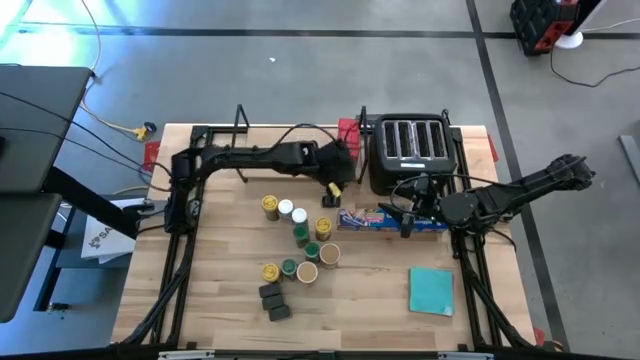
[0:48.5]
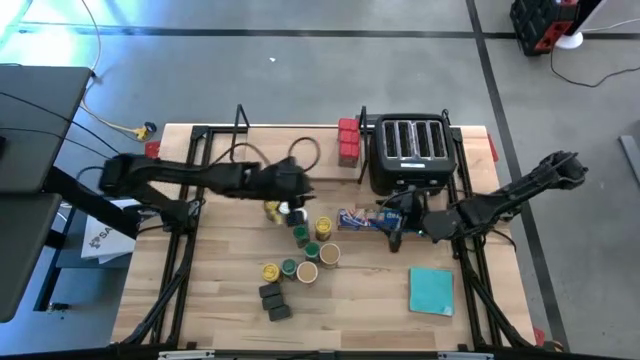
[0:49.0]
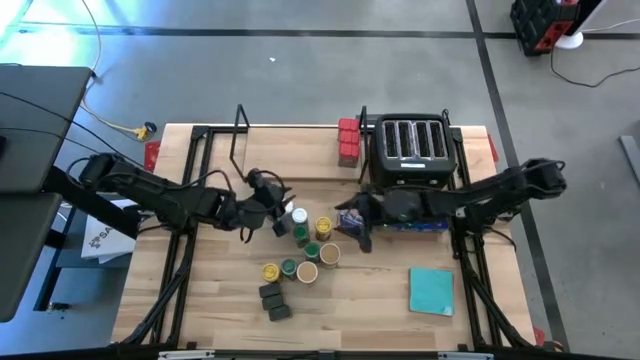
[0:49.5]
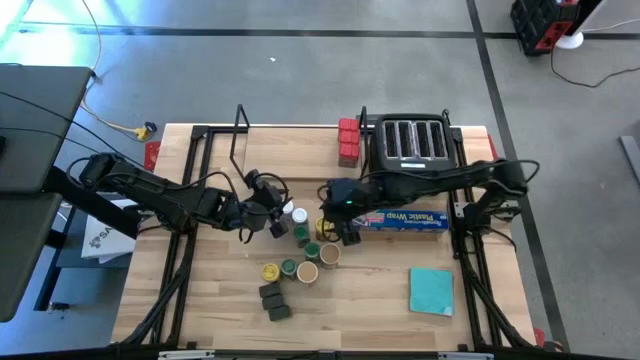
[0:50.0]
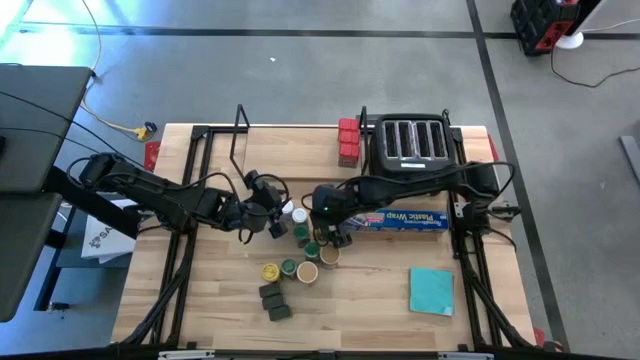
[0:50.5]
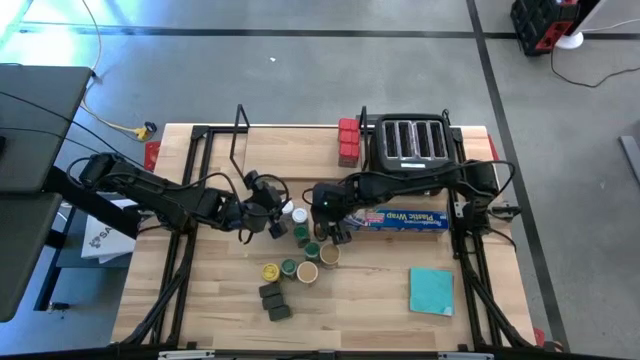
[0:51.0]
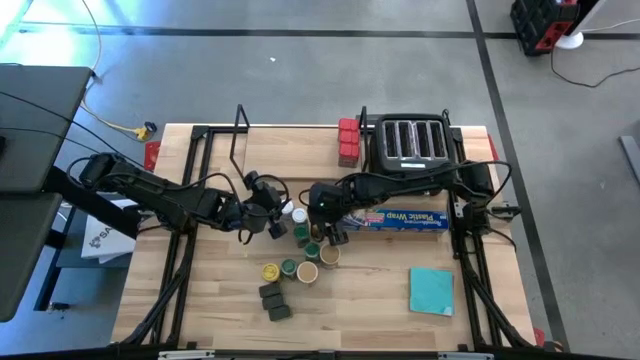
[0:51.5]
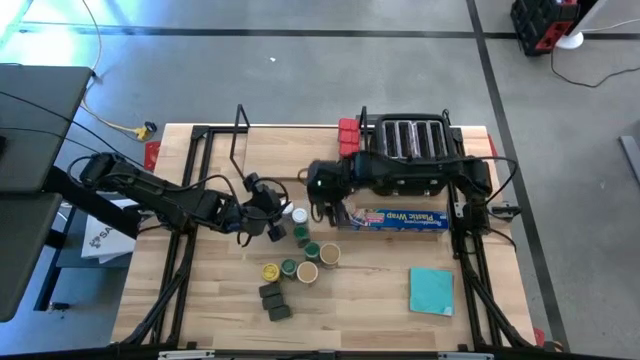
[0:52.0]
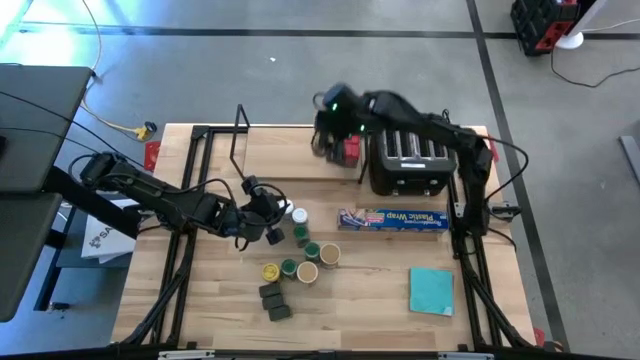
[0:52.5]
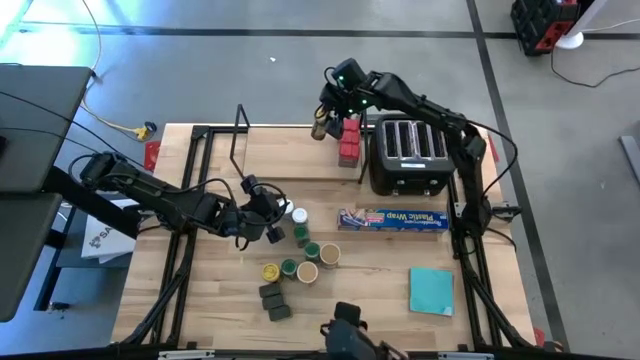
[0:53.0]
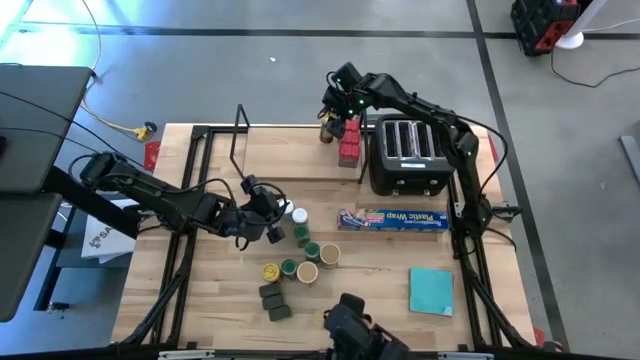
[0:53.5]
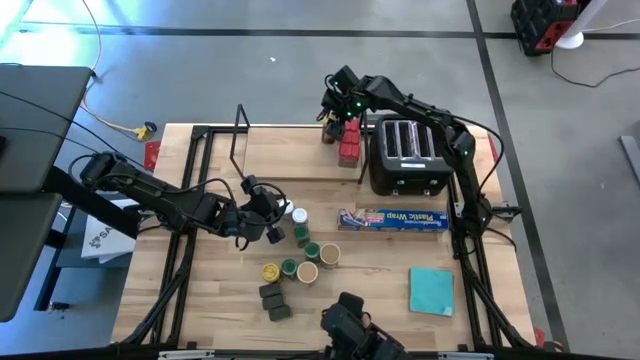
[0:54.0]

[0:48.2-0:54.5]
Task: Shelf spices
Put the right yellow seasoning can on the shelf

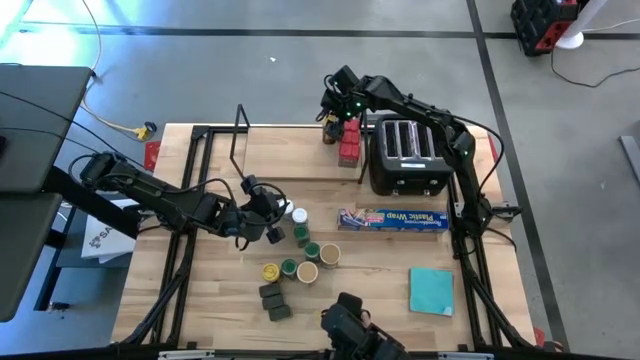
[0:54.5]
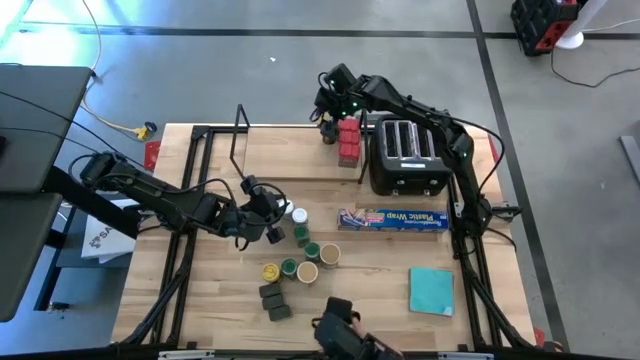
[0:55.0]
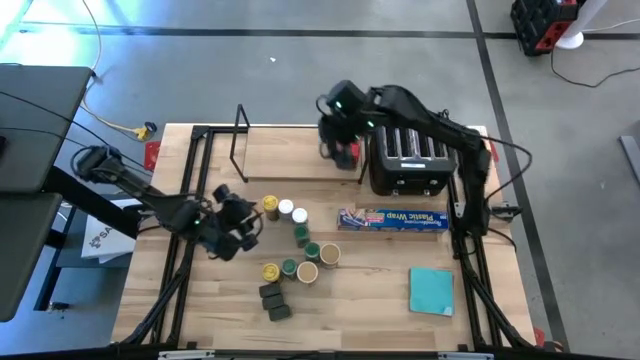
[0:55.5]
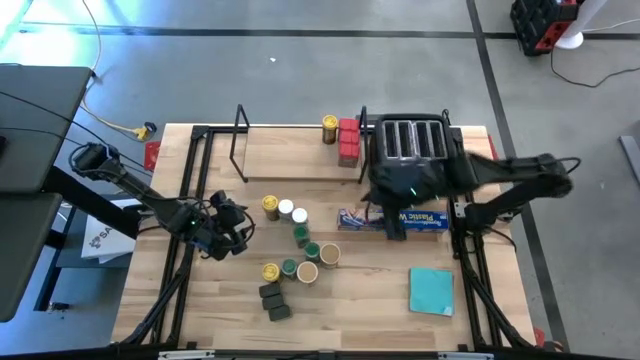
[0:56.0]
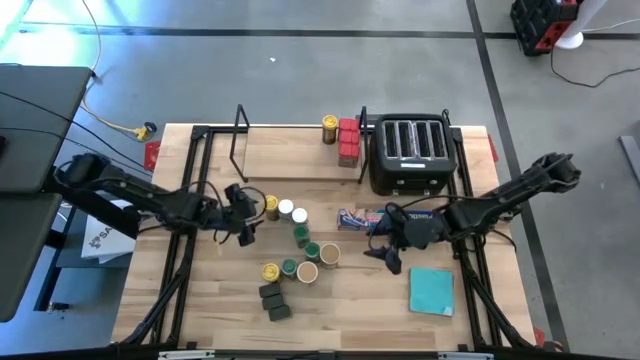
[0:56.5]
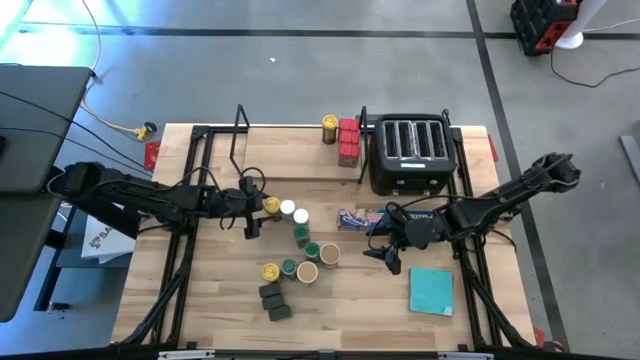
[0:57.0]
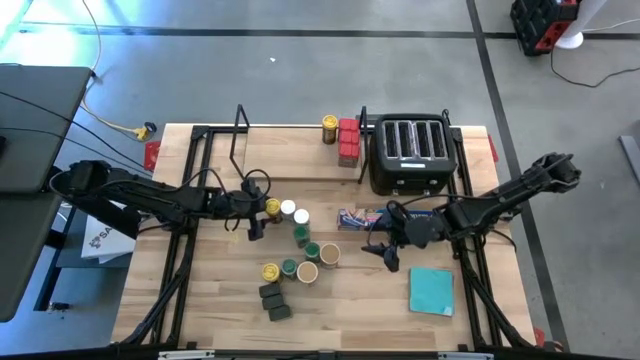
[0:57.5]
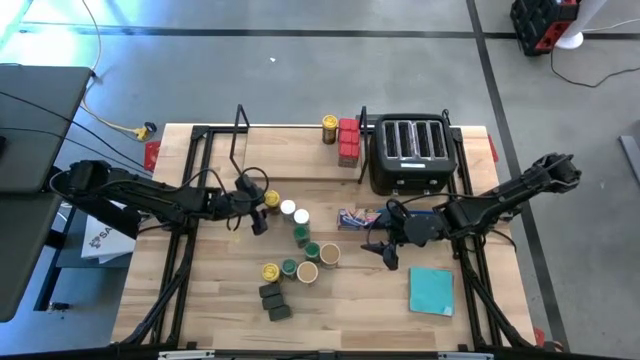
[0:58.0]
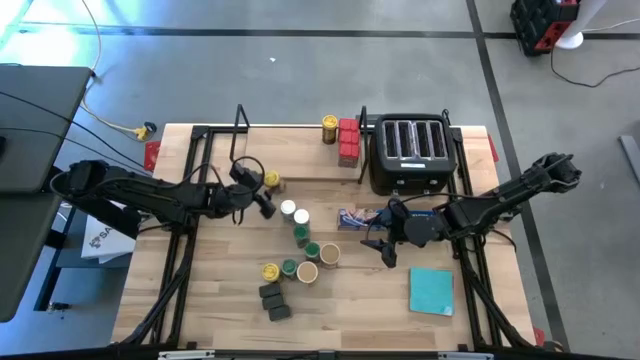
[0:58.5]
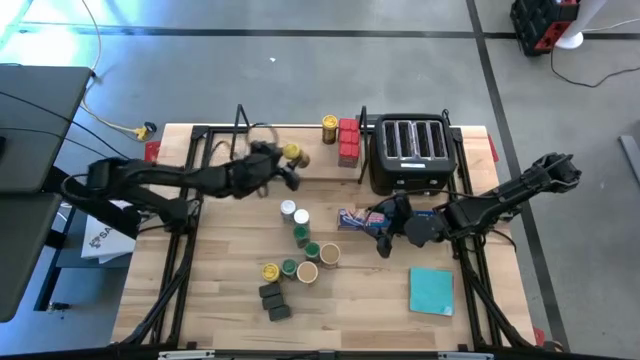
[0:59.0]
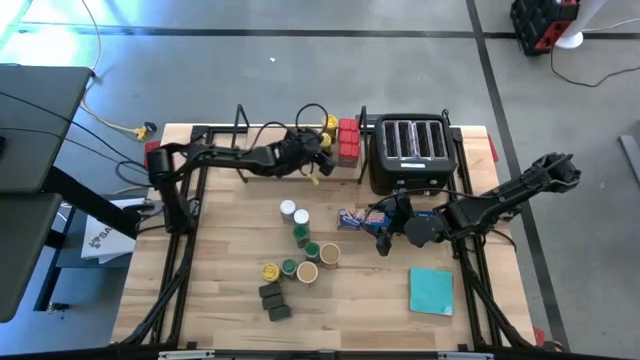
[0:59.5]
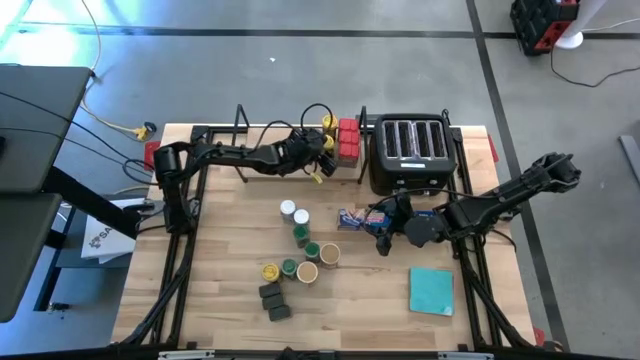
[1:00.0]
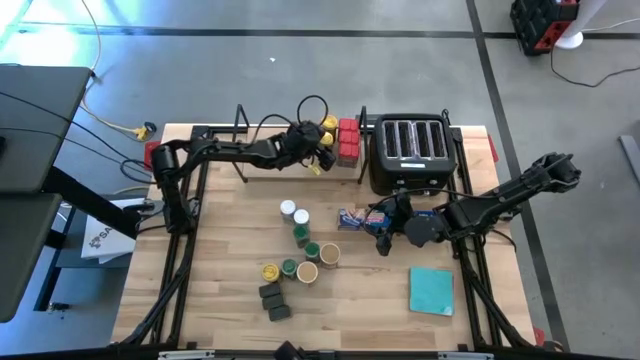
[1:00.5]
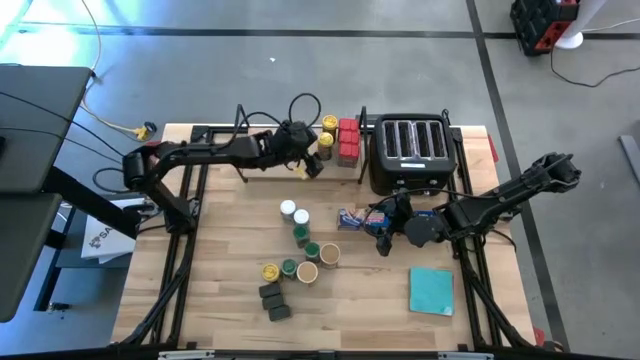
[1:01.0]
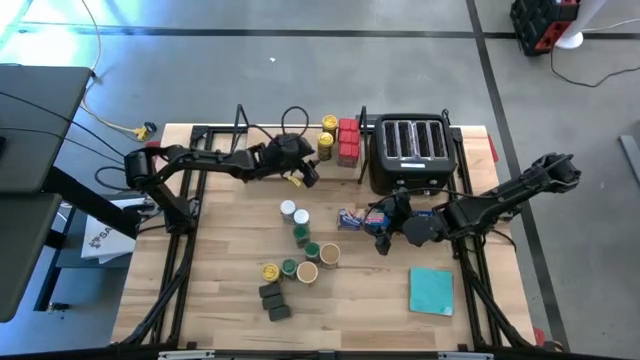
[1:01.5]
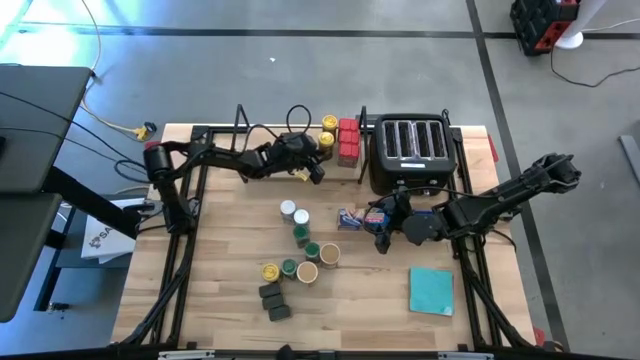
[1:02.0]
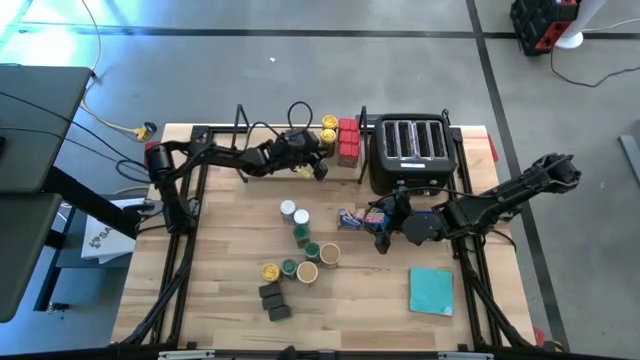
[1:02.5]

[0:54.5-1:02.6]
Put the top yellow seasoning can on the shelf aligned with the other yellow seasoning cans

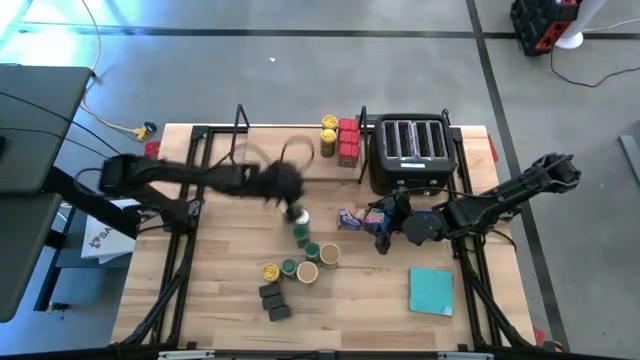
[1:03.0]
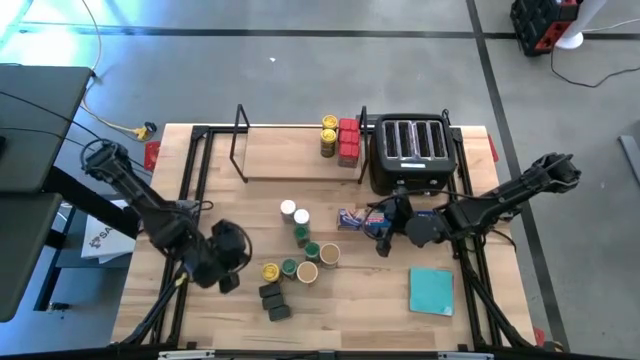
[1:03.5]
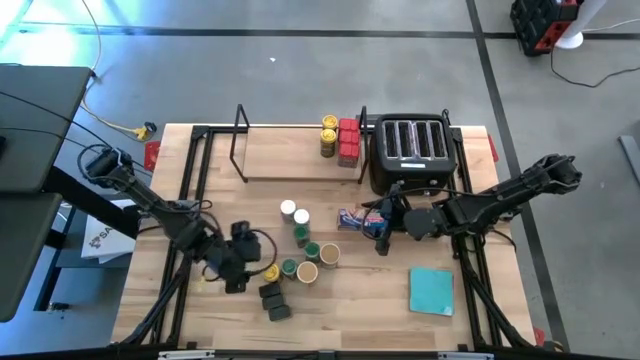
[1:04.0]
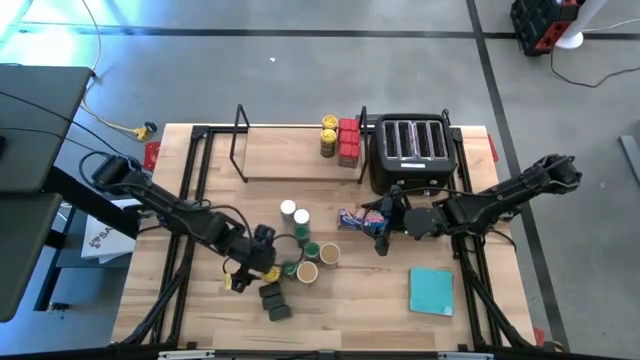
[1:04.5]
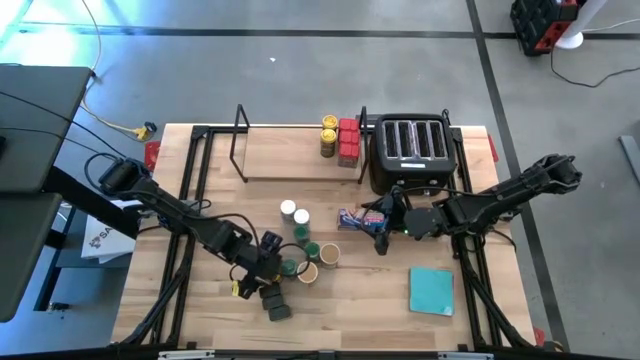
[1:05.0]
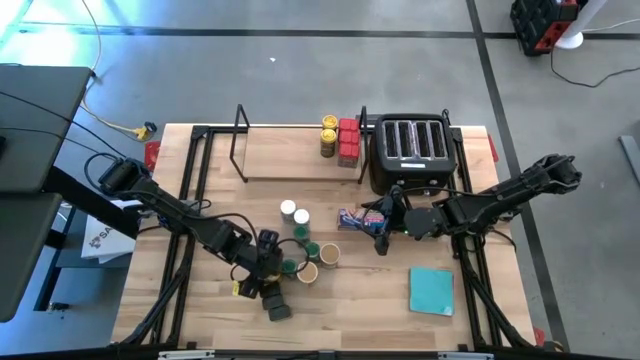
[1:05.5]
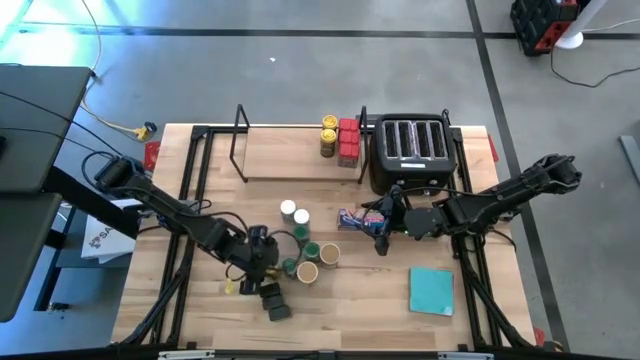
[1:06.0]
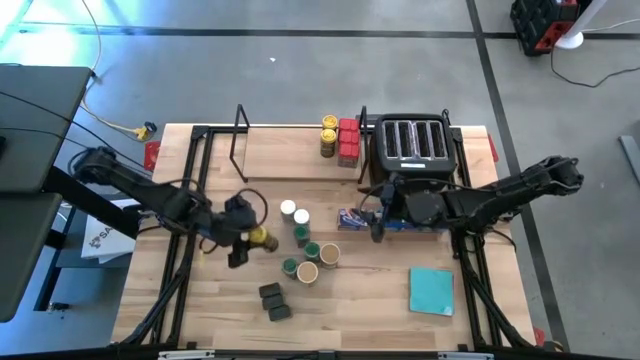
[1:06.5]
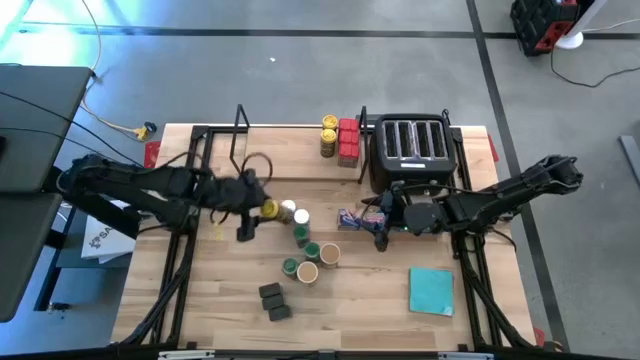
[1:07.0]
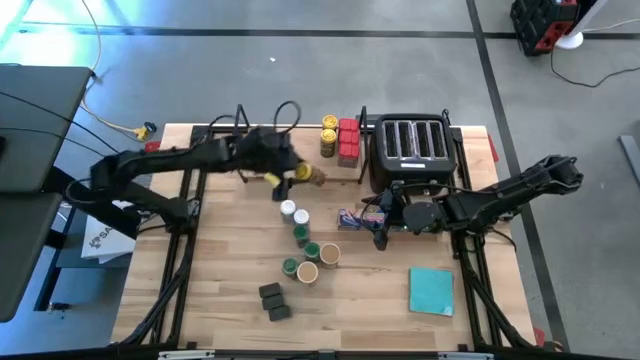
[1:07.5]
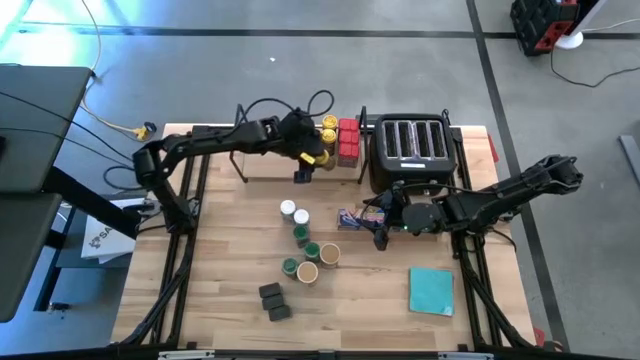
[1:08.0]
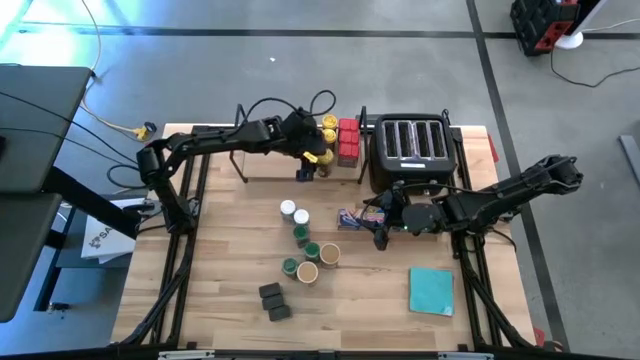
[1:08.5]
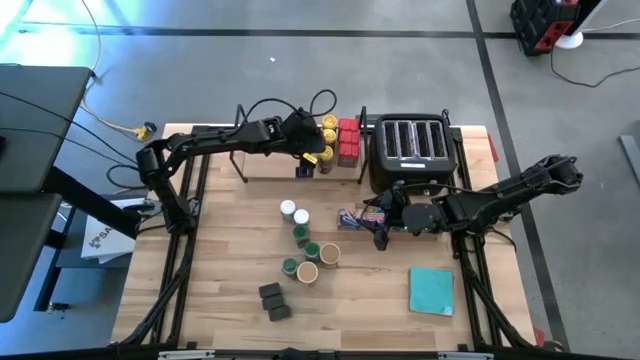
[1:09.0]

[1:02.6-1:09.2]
Put the yellow seasoning can on the shelf aligned with the other yellow seasoning cans
